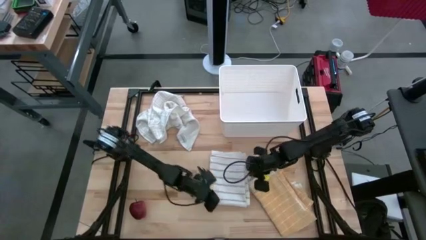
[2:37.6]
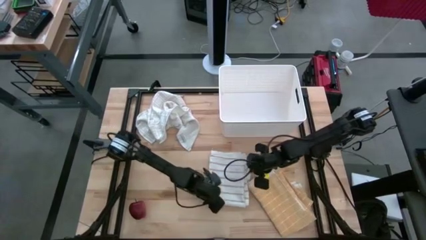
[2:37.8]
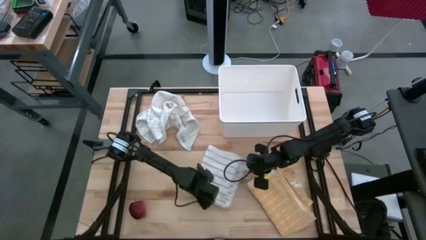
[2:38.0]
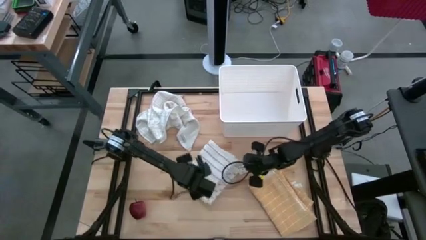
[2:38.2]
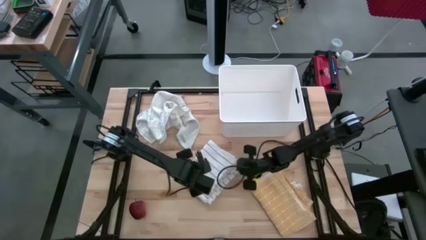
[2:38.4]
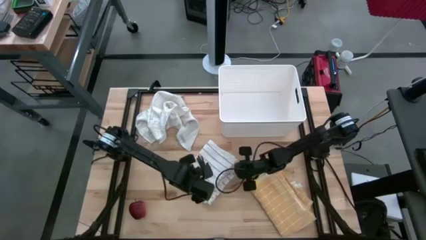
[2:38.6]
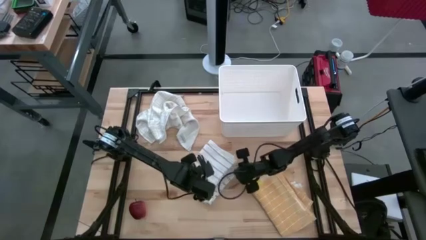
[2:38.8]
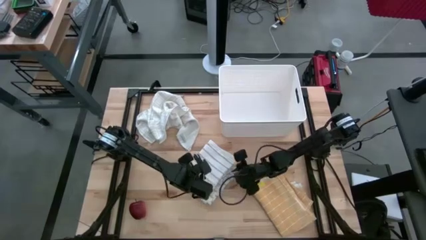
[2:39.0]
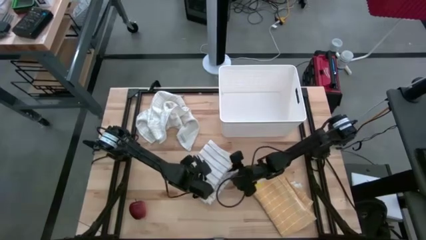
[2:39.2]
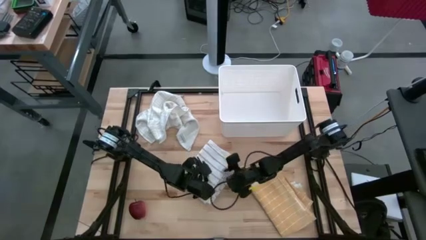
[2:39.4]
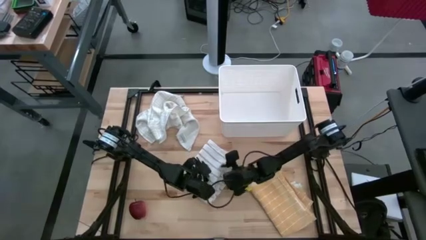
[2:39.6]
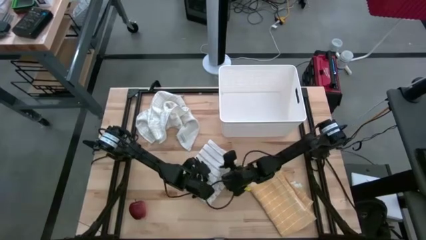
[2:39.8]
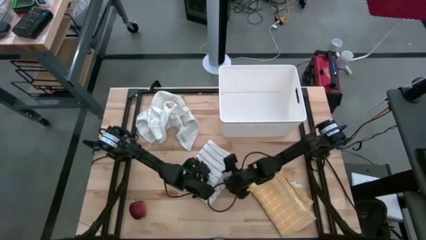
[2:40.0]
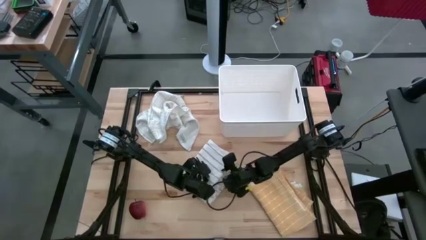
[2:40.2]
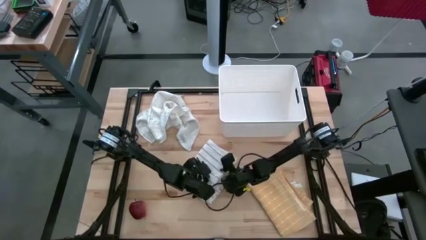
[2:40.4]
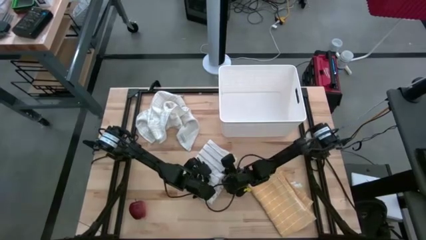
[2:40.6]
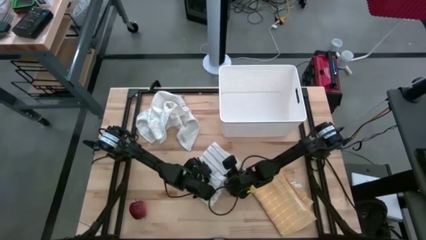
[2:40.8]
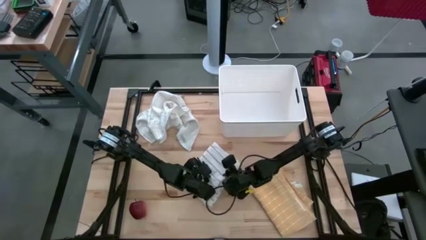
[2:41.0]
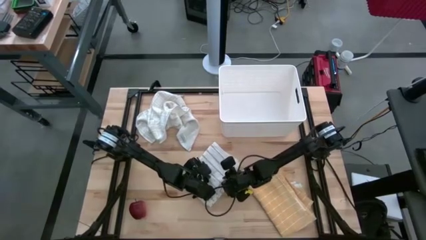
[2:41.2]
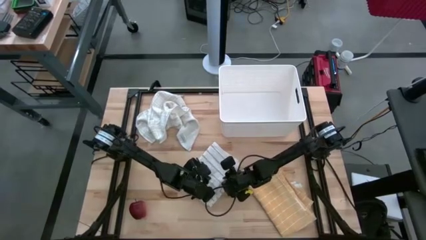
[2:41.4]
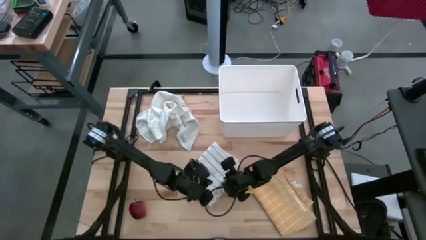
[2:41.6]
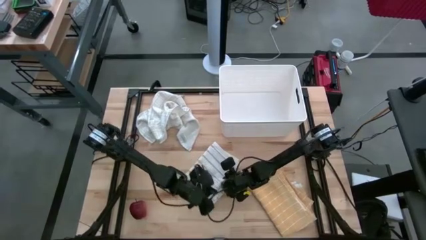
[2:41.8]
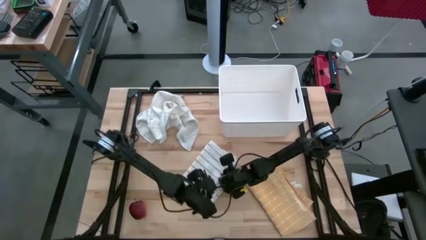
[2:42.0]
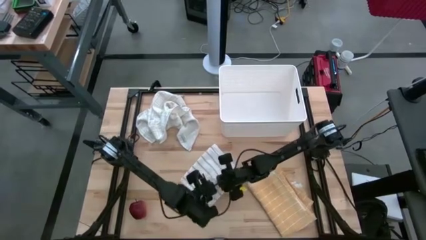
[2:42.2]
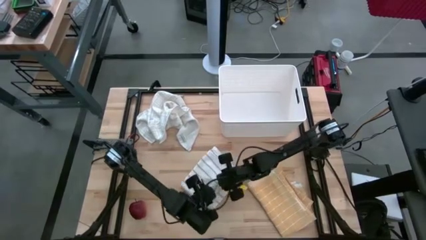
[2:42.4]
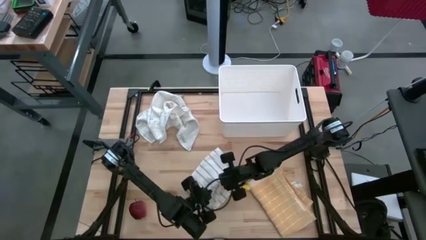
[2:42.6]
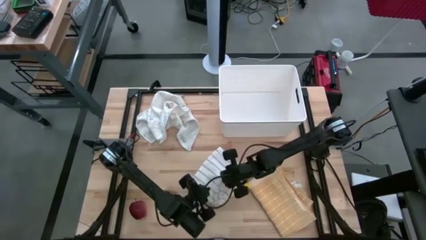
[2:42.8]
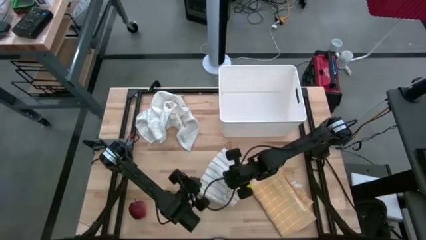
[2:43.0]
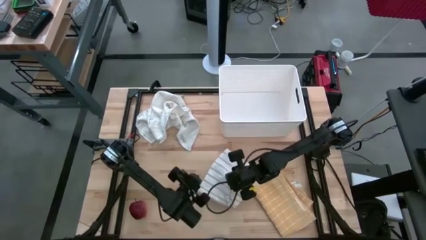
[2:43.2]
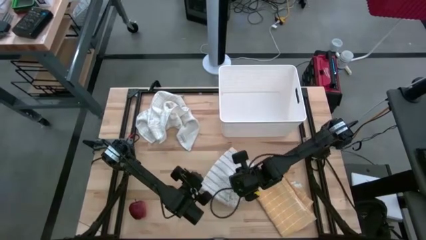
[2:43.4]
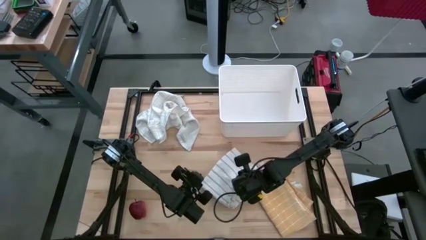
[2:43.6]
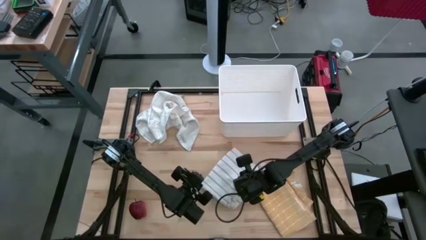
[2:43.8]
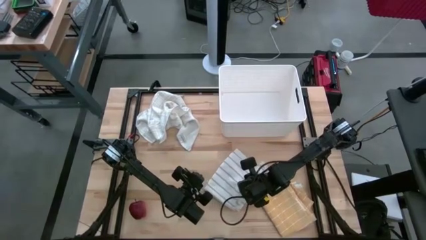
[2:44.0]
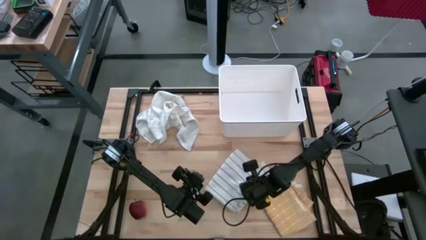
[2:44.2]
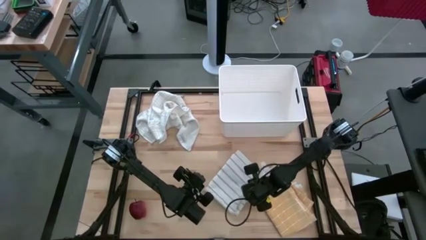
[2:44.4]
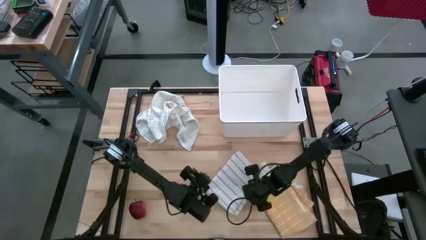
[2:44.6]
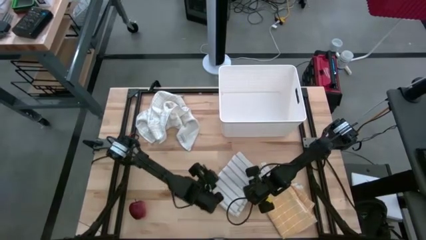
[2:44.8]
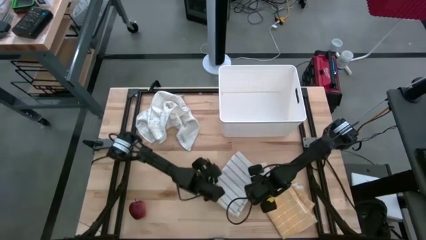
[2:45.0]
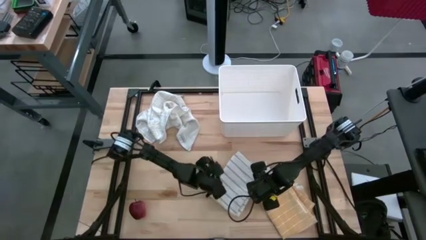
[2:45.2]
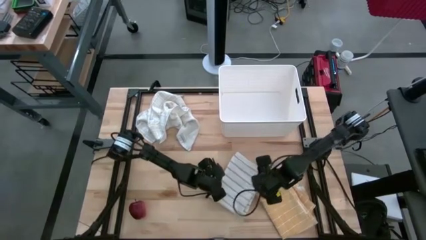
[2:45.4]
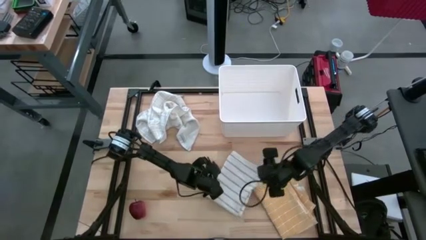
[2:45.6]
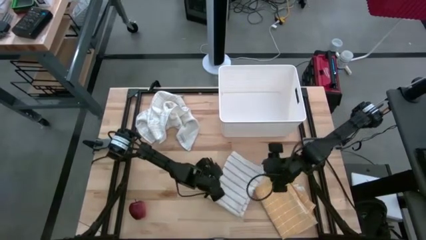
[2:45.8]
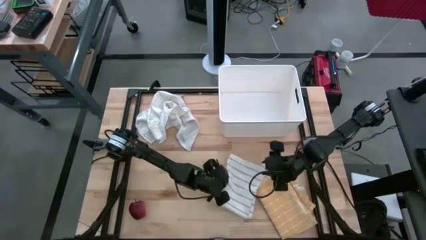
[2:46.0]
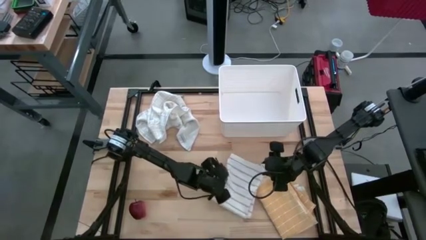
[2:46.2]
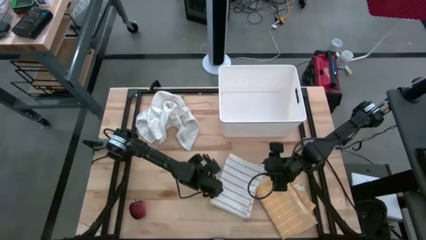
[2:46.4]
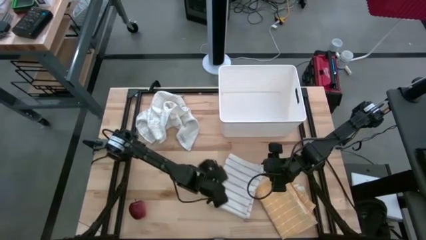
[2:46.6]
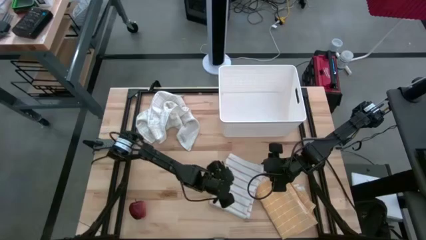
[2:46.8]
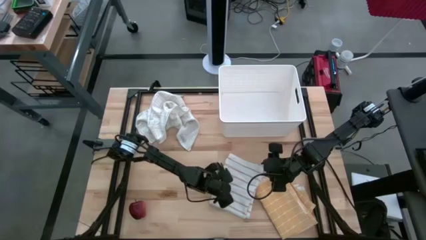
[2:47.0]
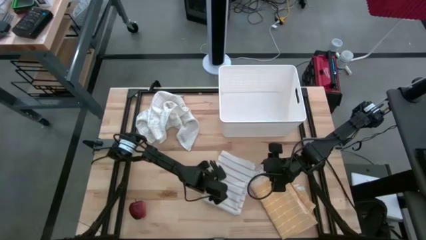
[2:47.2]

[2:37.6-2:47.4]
Task: Fold towel
Fold the white striped towel

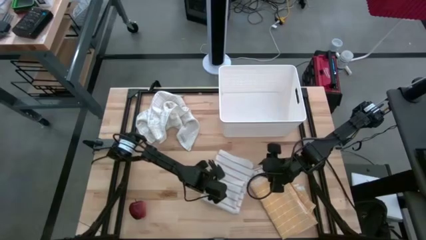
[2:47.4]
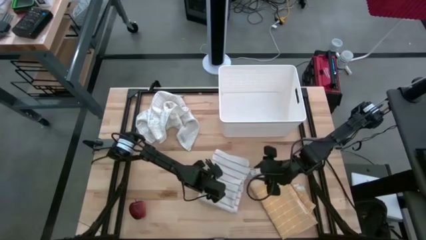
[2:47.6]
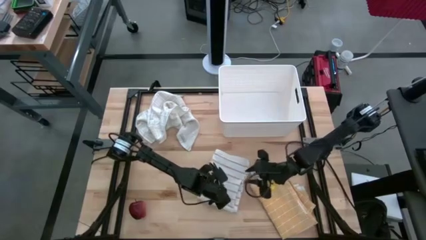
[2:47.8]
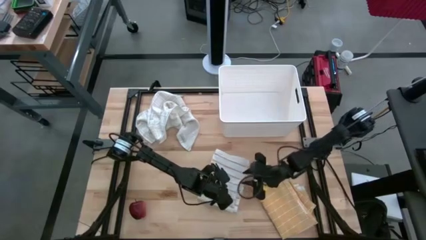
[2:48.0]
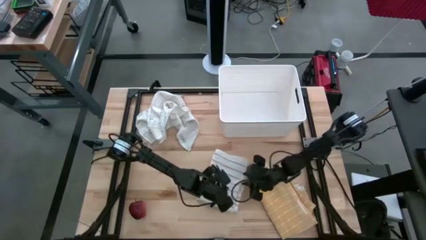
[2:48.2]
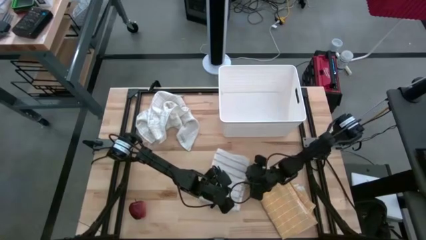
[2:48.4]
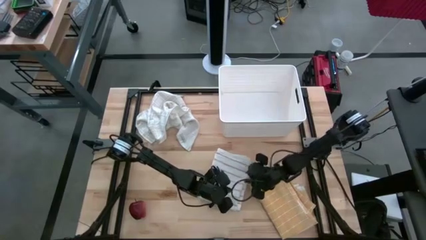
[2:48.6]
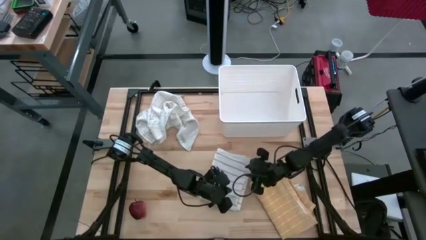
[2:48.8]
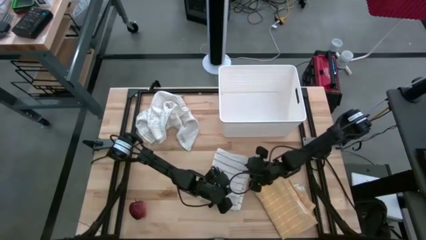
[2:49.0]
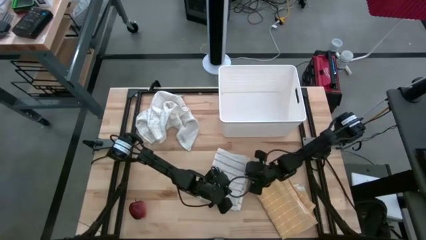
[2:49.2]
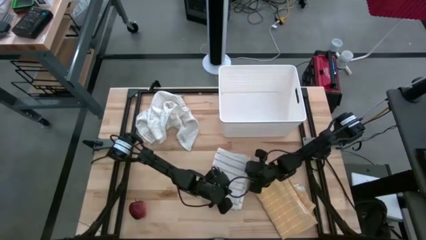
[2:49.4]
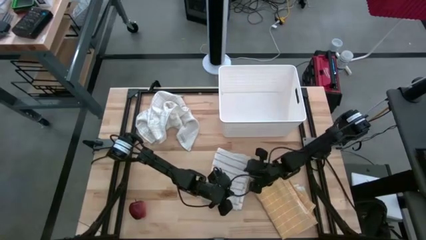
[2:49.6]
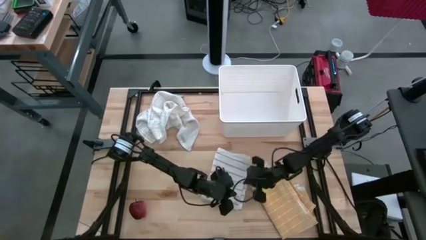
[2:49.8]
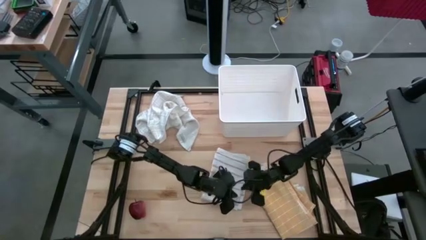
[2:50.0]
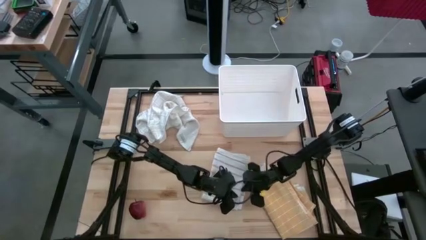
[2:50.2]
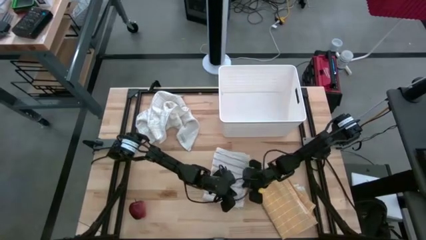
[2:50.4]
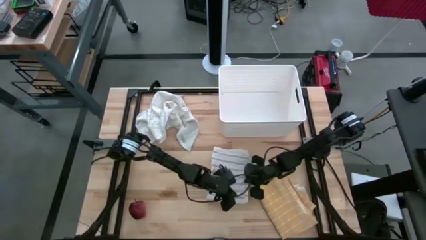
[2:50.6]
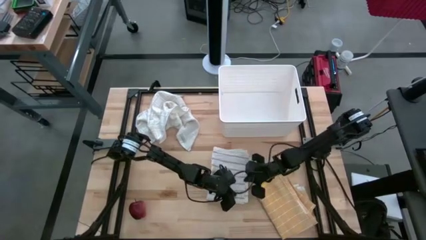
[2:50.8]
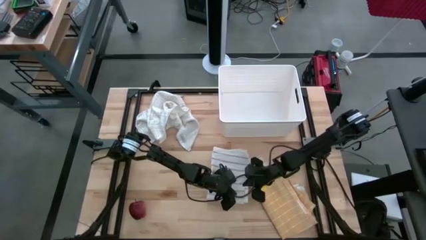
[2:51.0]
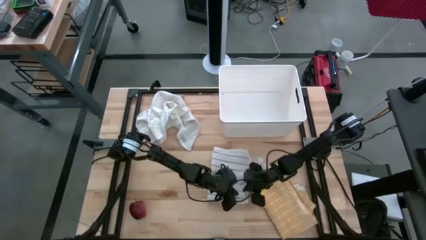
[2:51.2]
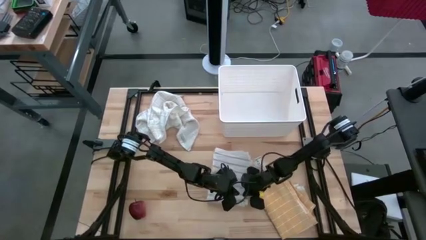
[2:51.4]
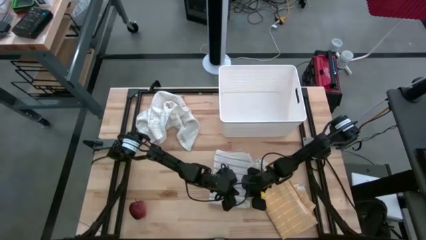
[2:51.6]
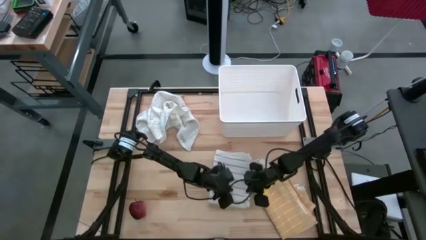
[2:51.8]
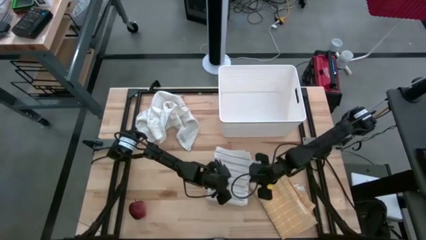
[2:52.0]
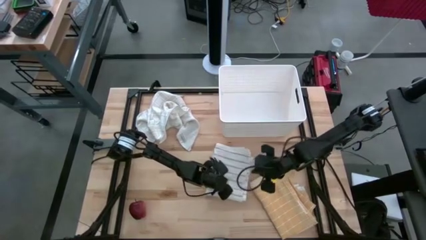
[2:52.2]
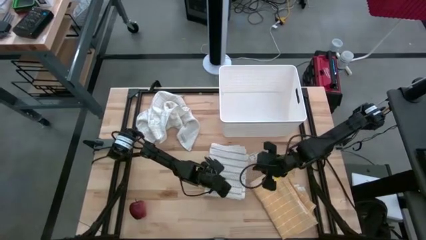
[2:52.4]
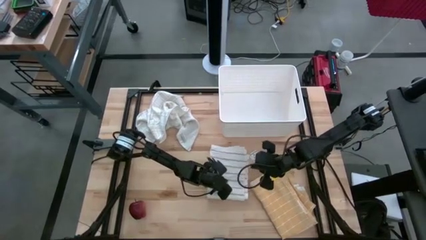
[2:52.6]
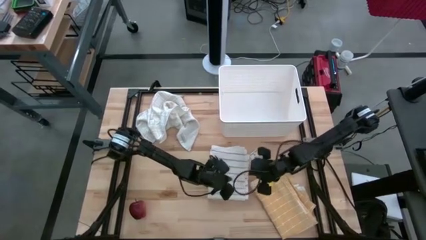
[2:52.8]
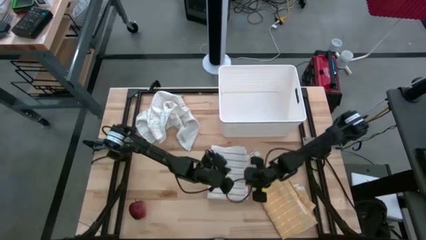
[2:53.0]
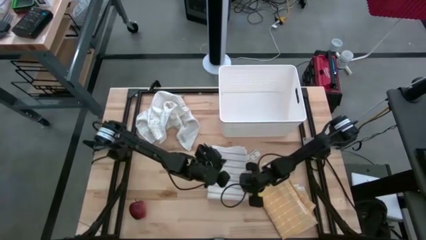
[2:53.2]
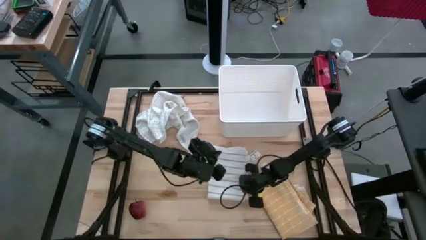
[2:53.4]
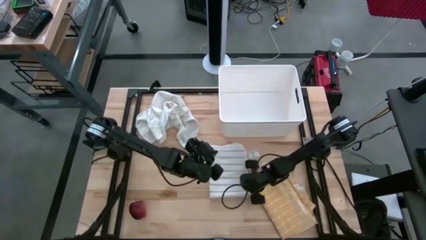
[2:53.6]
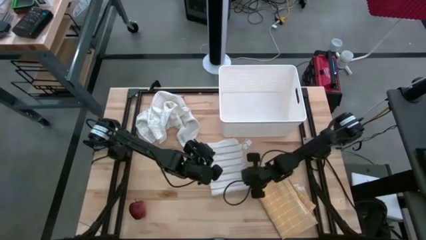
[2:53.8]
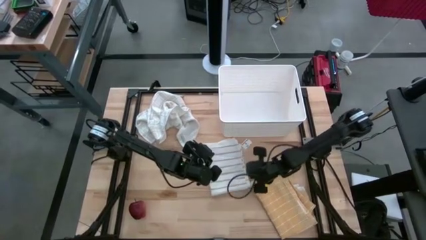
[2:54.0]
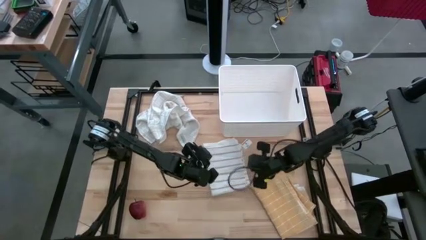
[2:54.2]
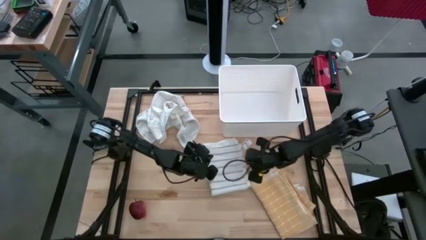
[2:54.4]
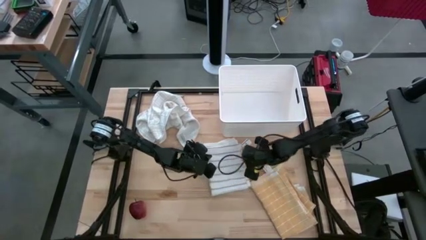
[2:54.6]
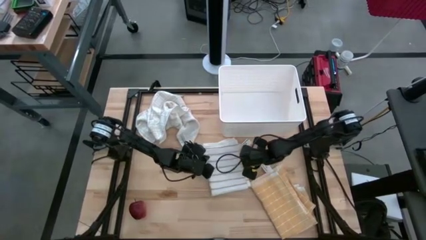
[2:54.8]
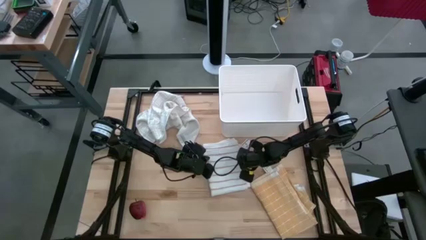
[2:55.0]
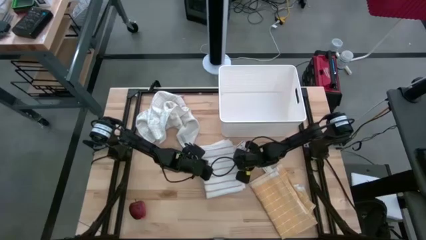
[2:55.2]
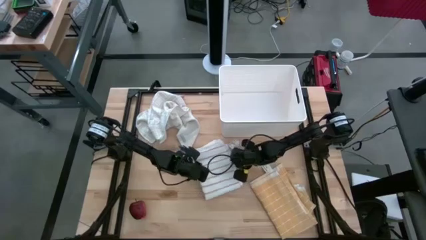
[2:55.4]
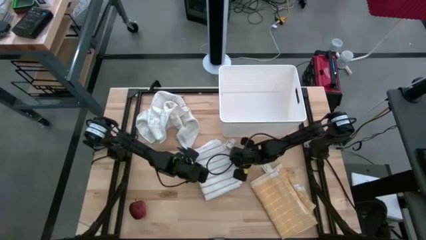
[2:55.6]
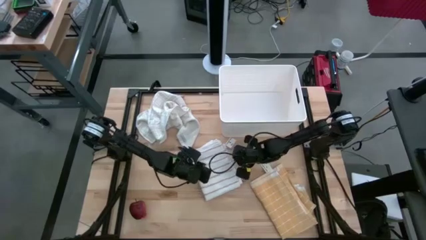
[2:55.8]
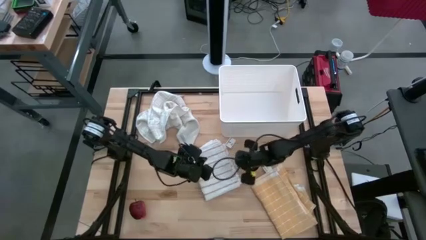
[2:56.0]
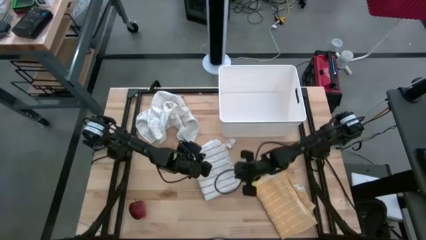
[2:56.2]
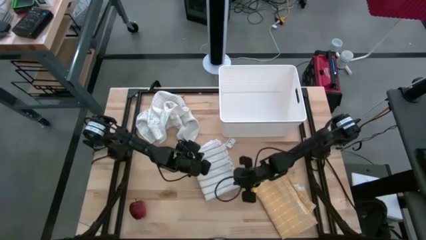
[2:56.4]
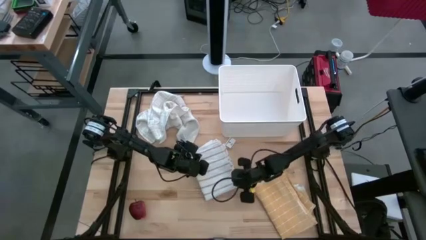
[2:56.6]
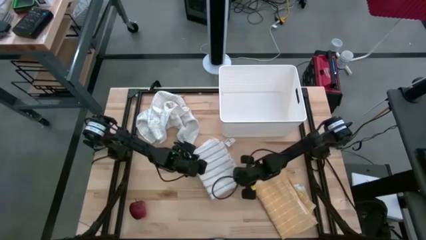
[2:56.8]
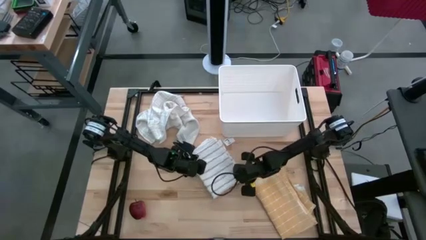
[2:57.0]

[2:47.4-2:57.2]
Fold the white striped towel
